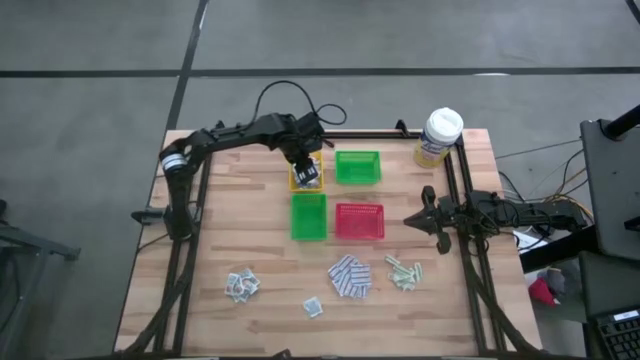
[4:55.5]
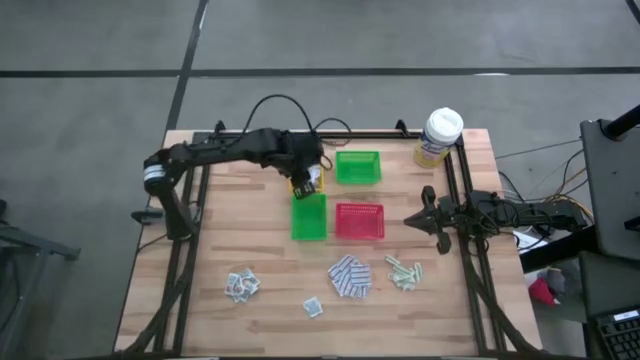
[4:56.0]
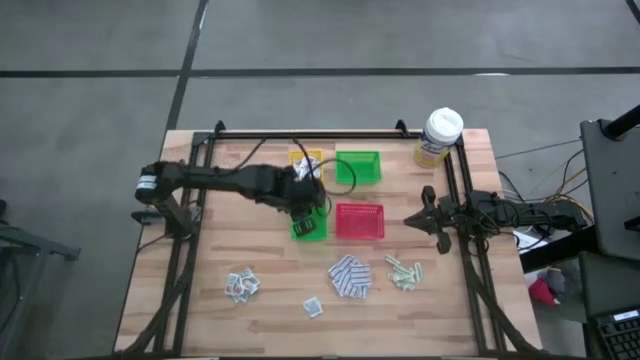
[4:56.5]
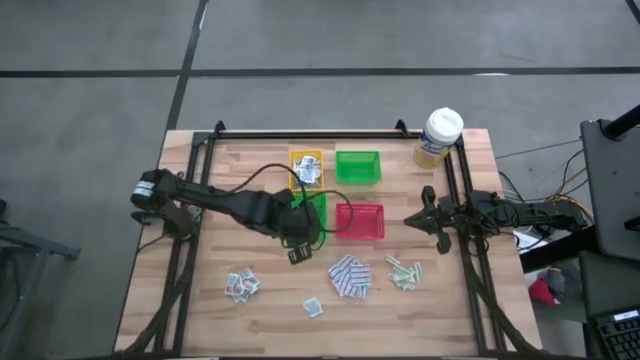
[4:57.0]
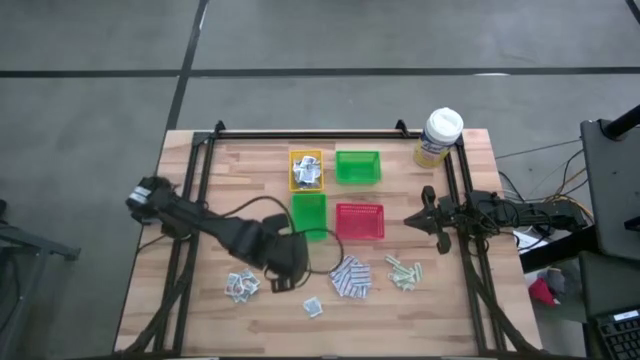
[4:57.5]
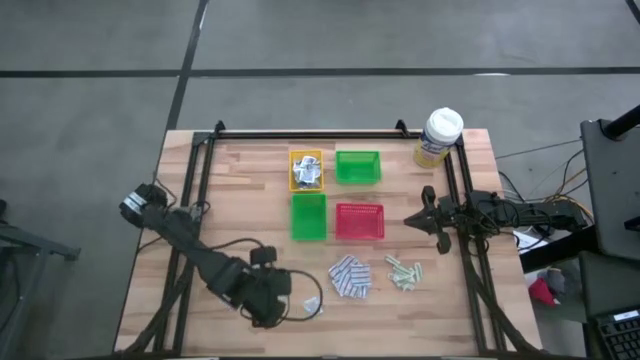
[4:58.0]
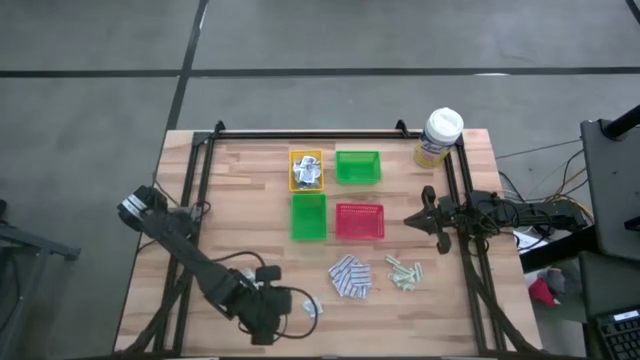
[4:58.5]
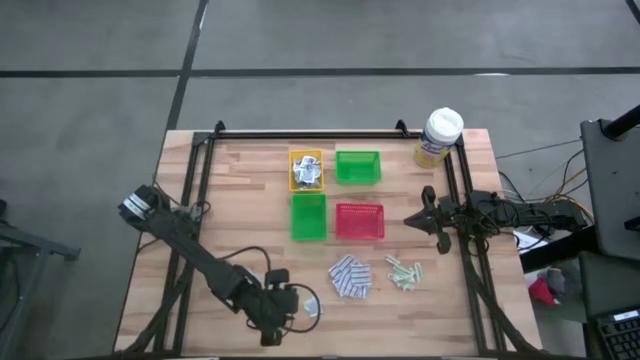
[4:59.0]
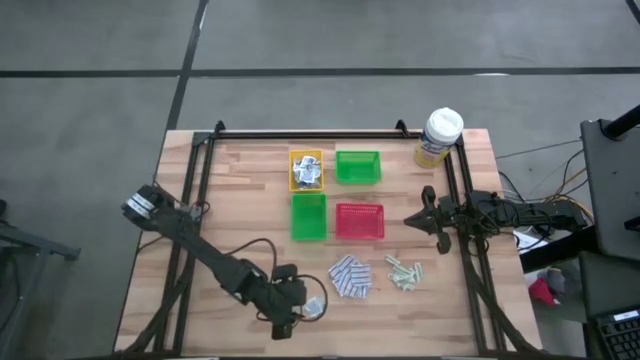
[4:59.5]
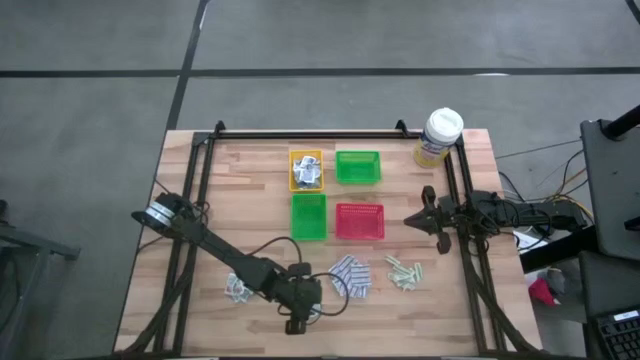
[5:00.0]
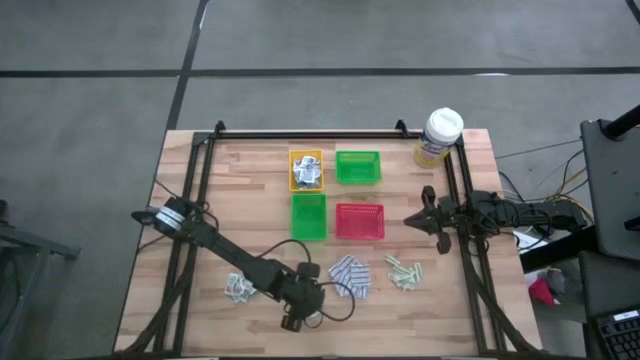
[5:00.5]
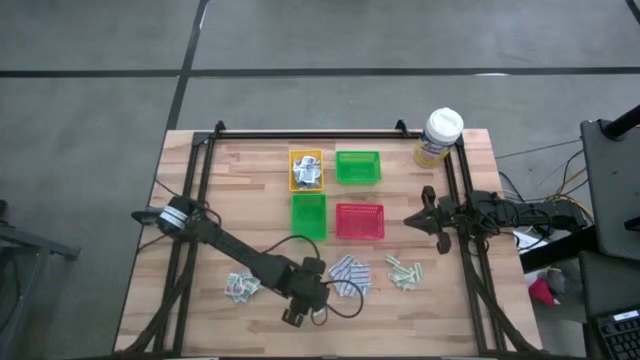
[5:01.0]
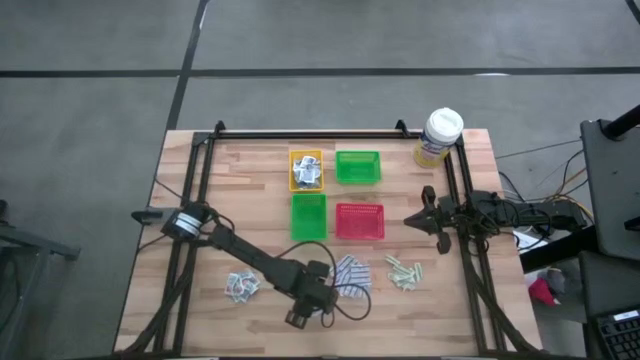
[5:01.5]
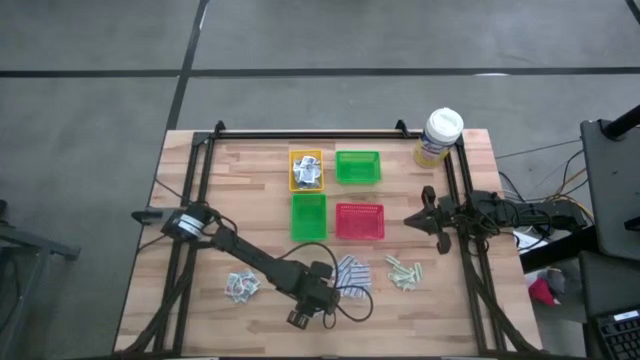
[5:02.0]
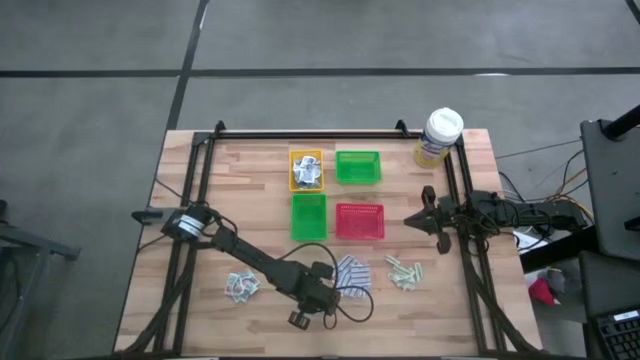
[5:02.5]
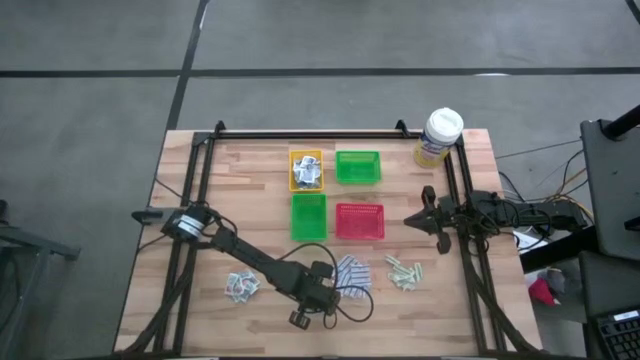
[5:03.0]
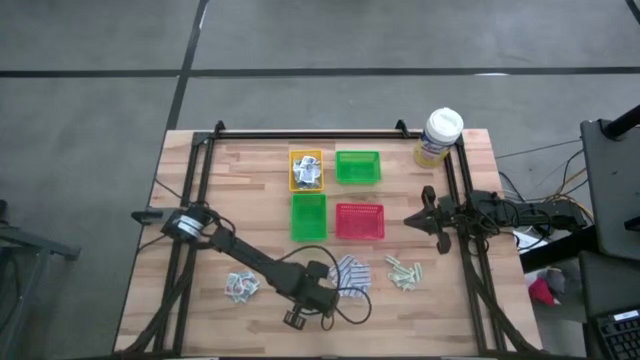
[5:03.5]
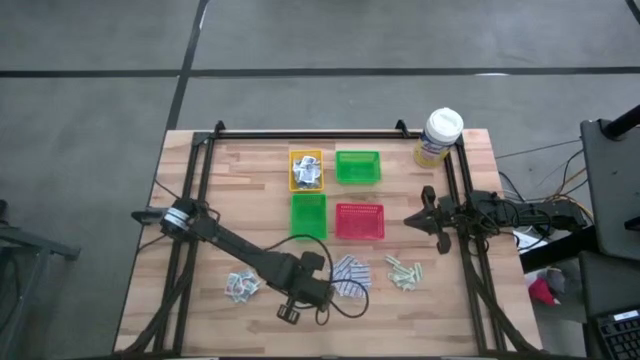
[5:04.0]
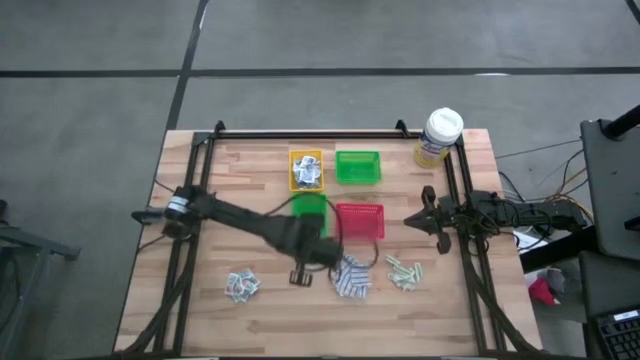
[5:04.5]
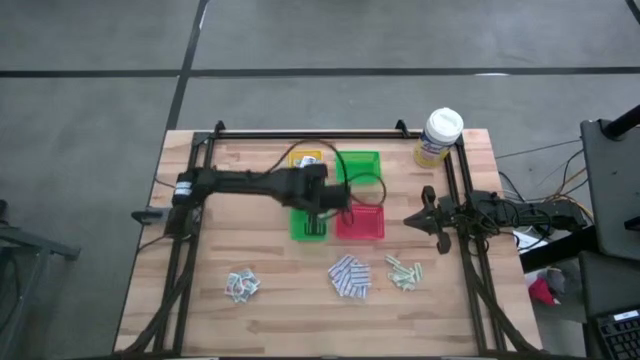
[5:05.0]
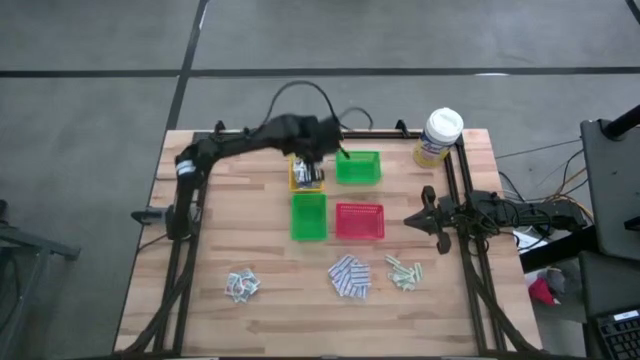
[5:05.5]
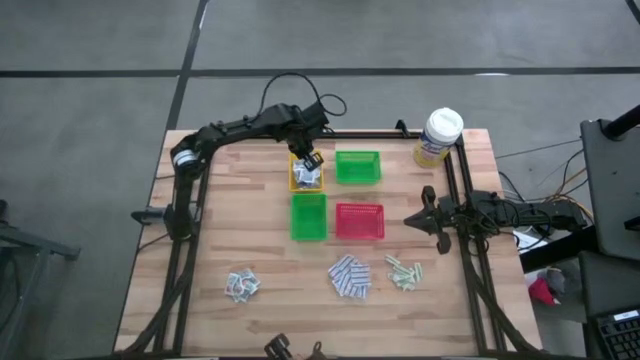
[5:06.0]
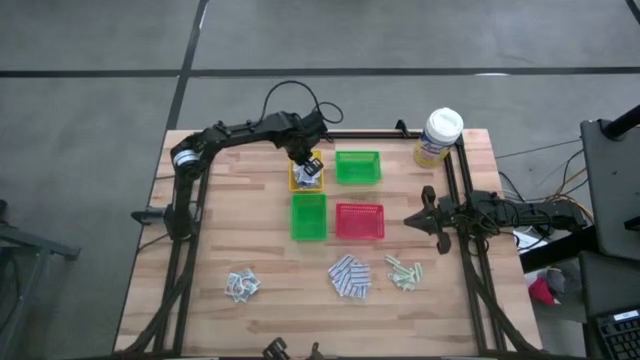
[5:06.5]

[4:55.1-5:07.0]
Task: Pick & Place First Aid Supplies
Put the blue alcohol pad into the yellow bin

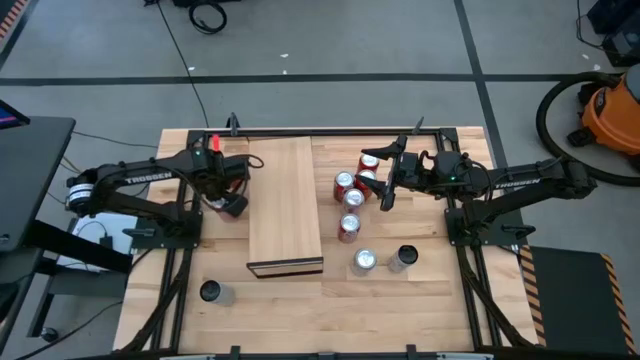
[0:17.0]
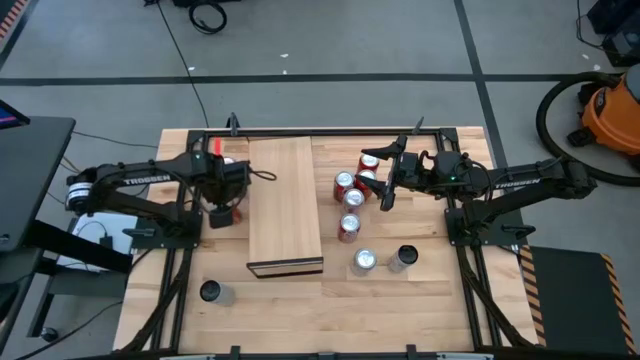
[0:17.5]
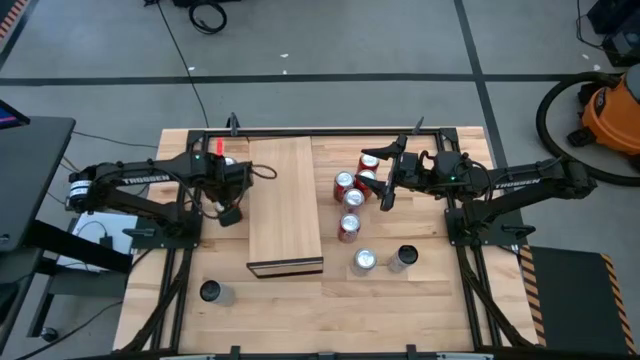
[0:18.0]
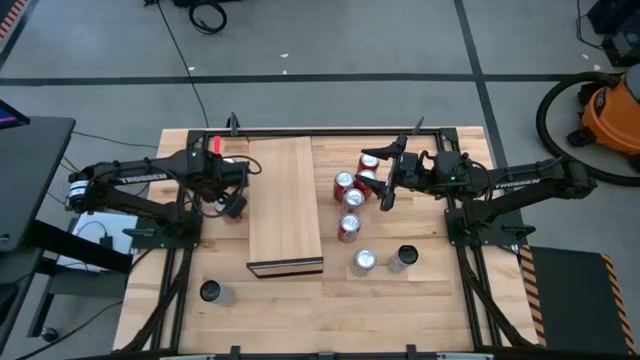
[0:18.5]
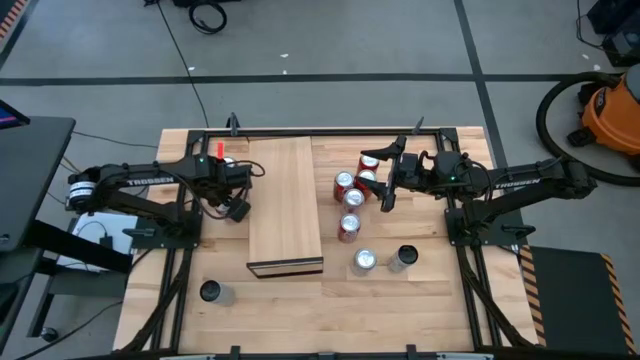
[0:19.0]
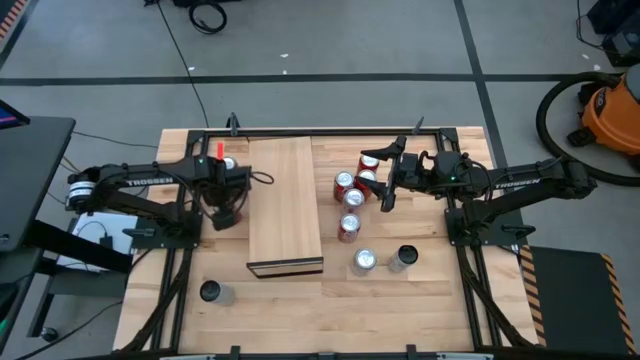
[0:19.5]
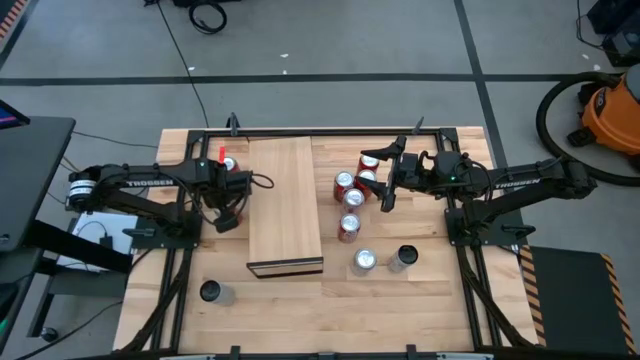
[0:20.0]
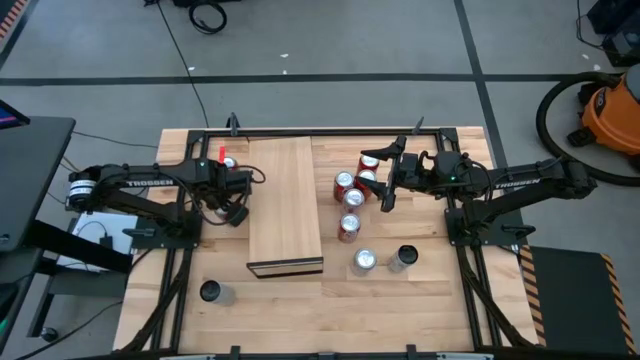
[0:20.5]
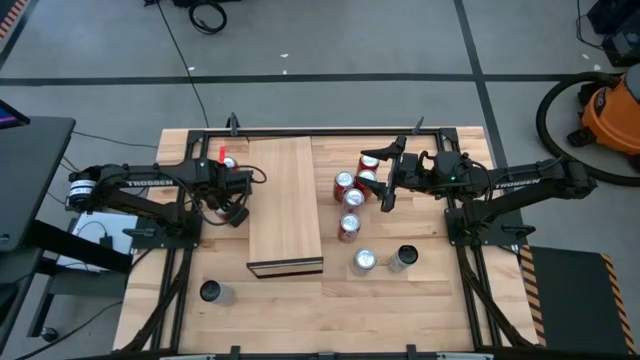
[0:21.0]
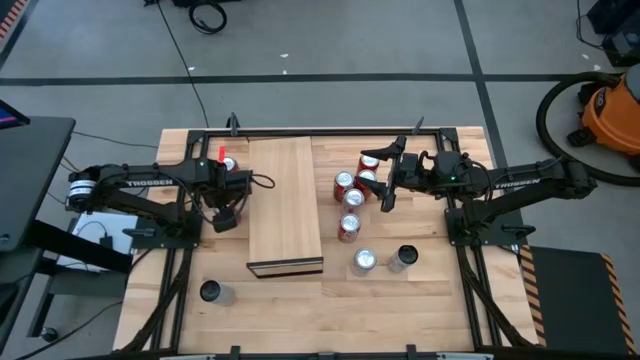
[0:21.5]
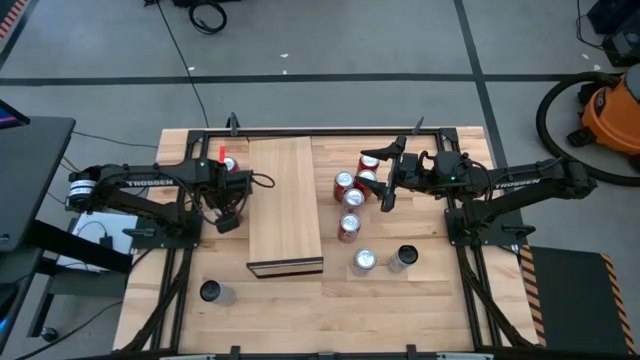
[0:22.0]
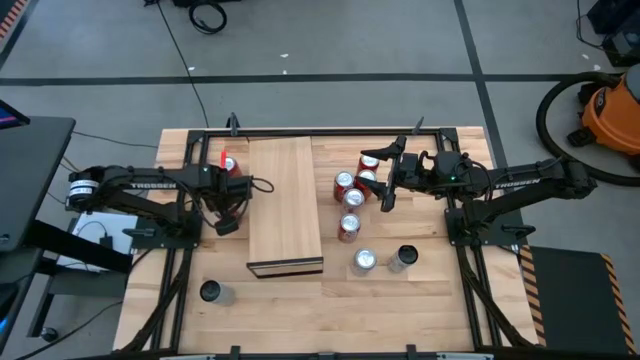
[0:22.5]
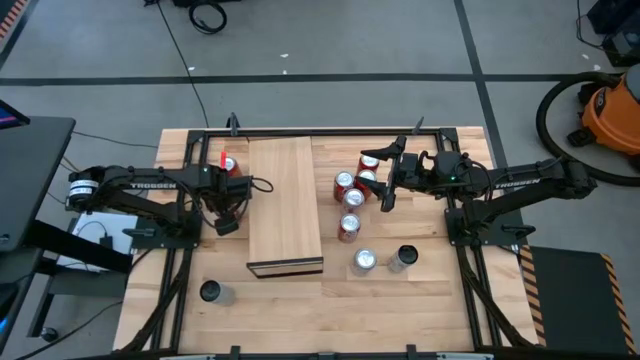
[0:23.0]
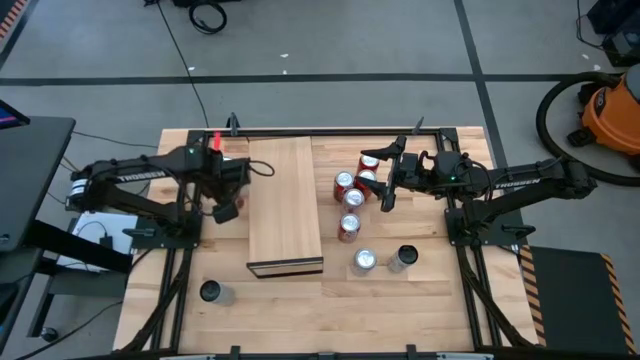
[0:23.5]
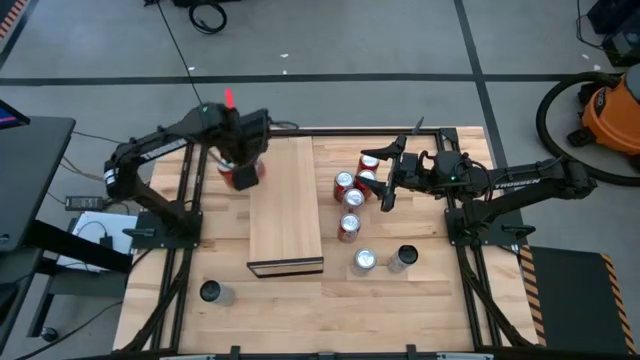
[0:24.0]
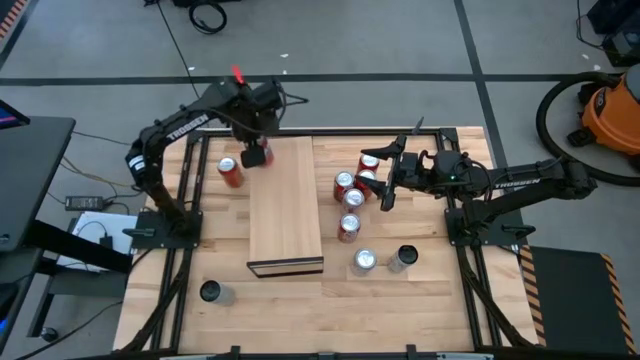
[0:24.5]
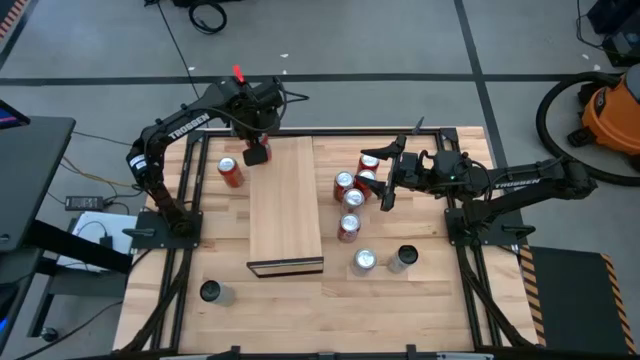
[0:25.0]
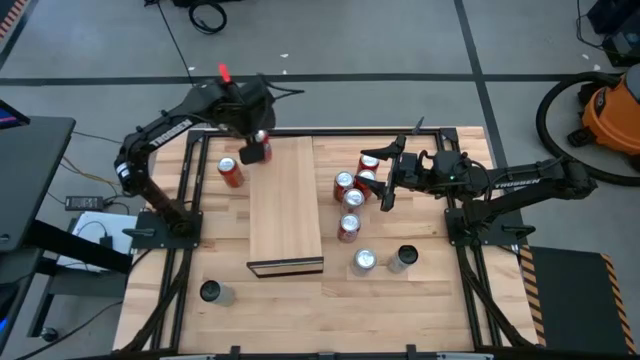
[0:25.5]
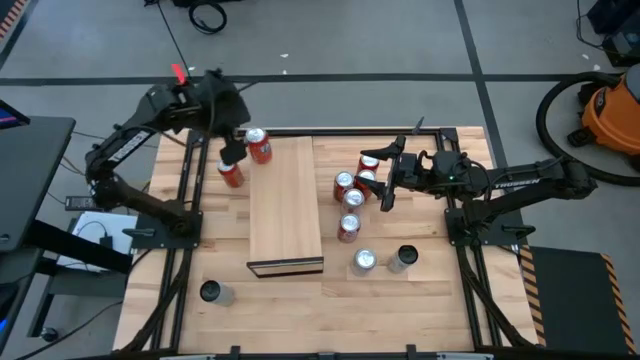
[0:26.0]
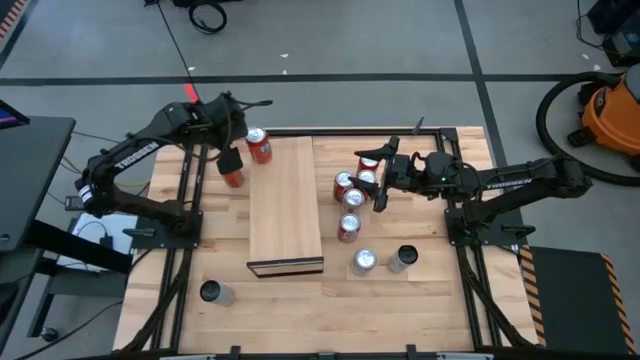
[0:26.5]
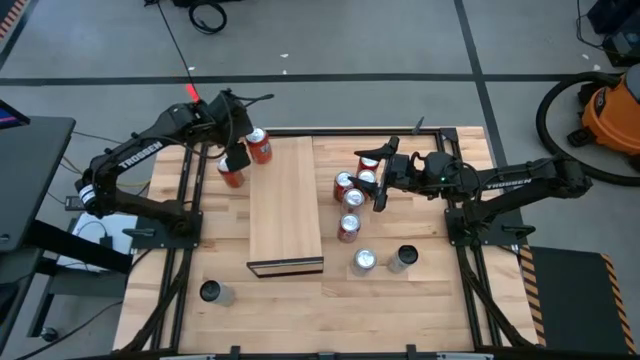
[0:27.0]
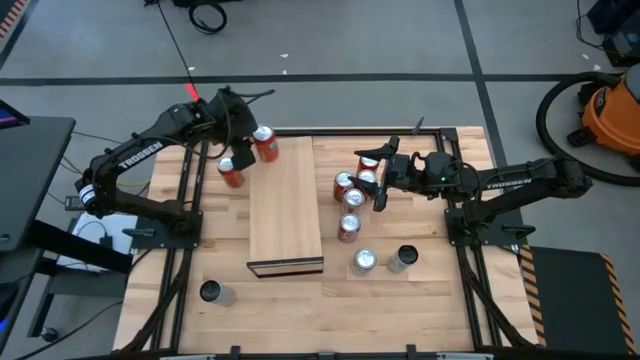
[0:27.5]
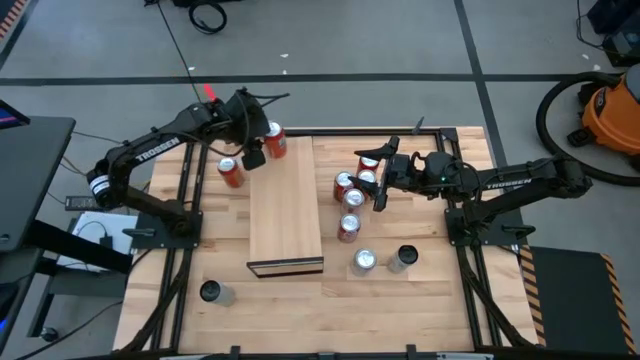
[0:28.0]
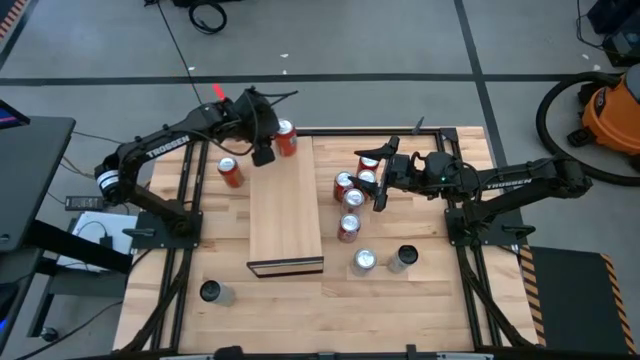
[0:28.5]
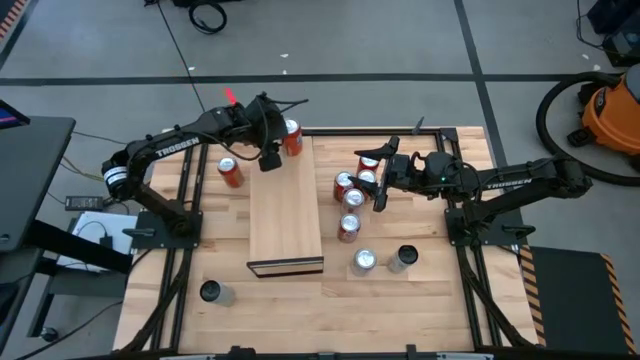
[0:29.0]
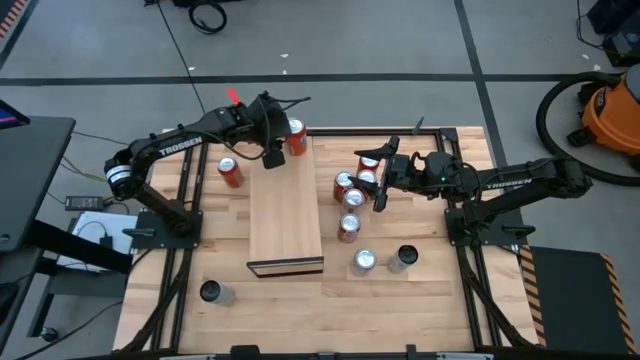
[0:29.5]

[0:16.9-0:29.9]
Task: Place canned beverage on shelf
Put the bottom orange soda can on the shelf
